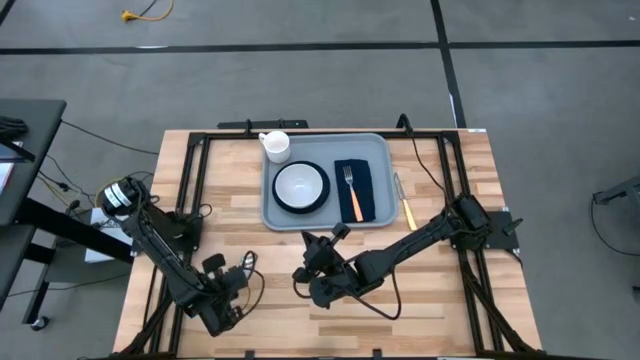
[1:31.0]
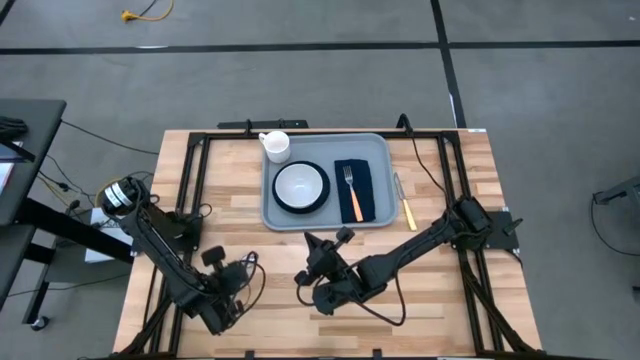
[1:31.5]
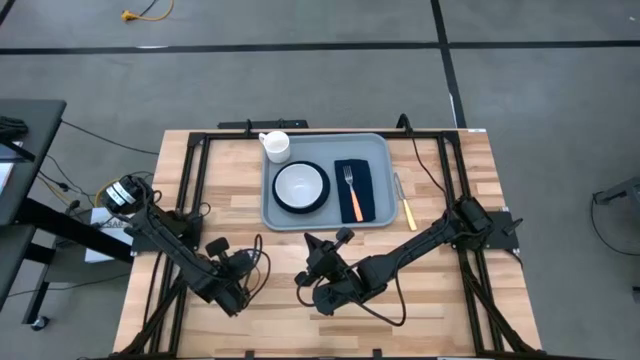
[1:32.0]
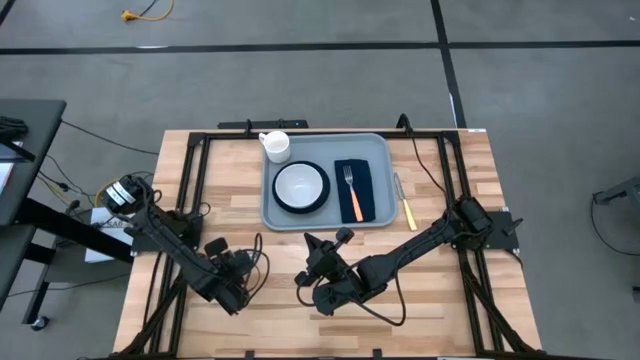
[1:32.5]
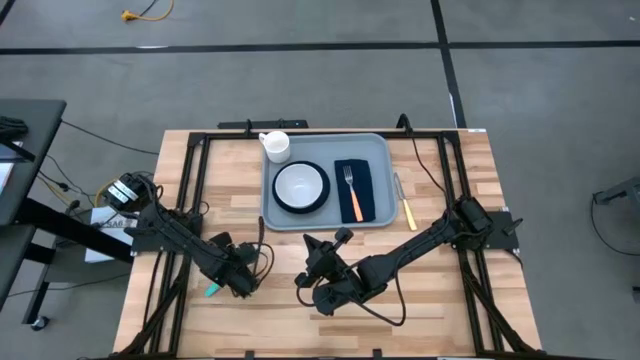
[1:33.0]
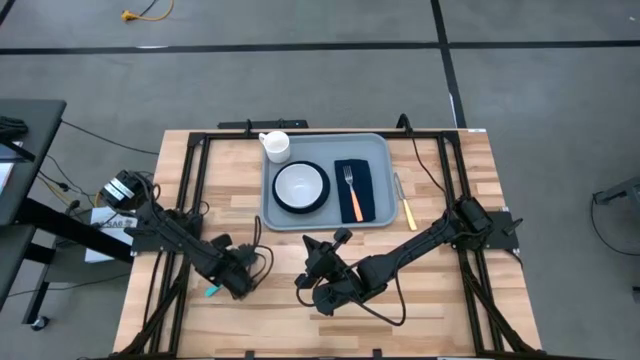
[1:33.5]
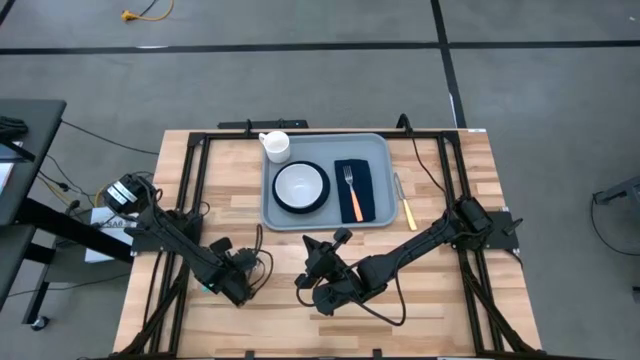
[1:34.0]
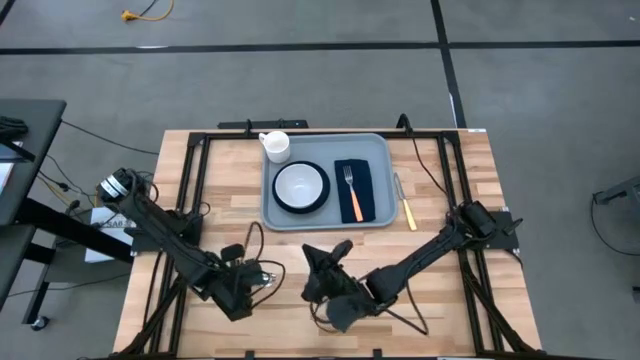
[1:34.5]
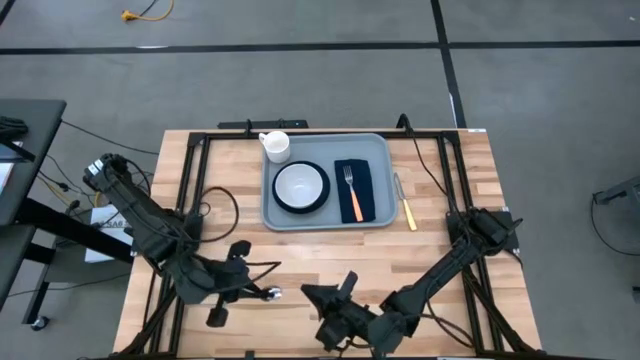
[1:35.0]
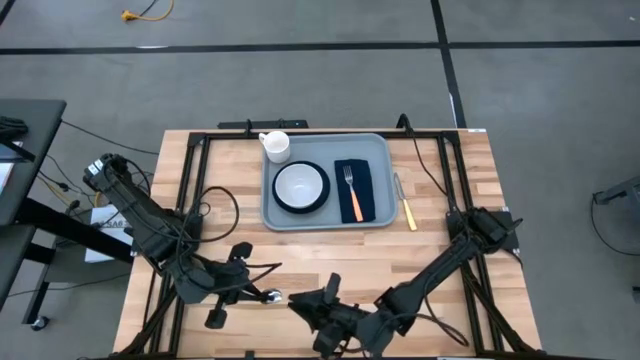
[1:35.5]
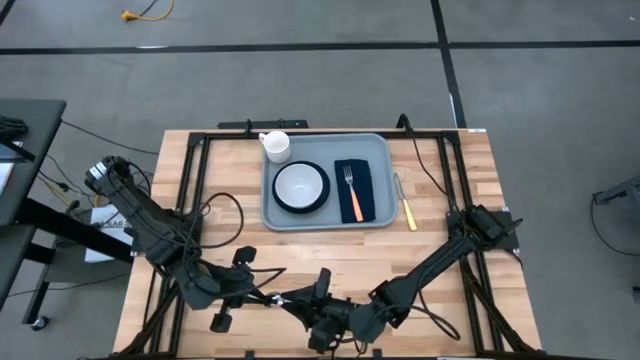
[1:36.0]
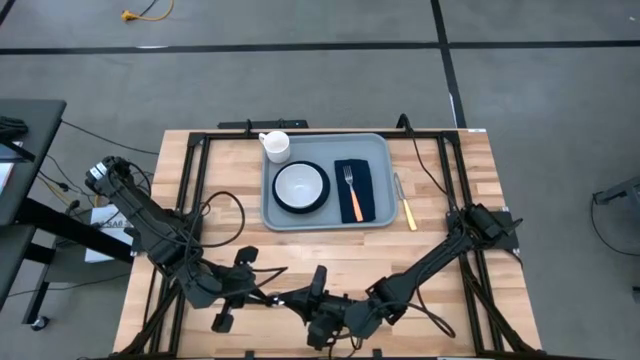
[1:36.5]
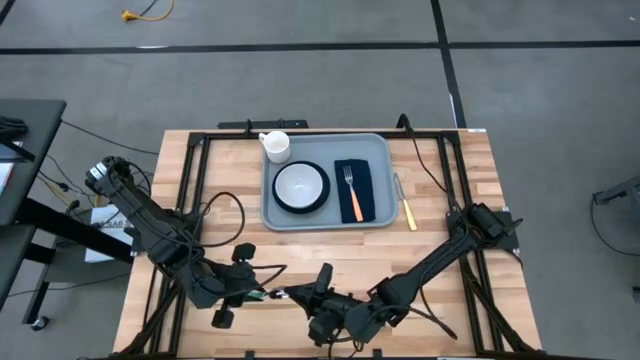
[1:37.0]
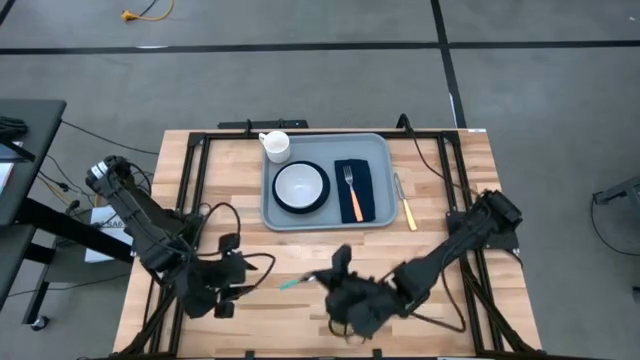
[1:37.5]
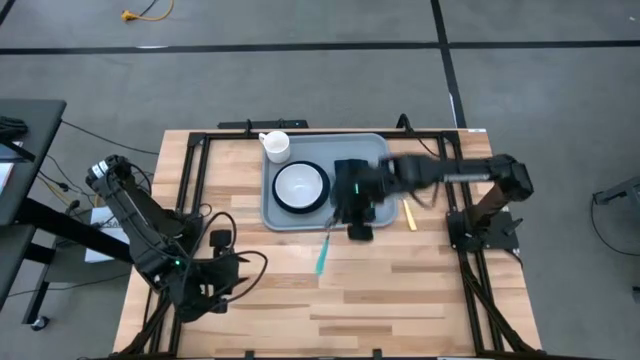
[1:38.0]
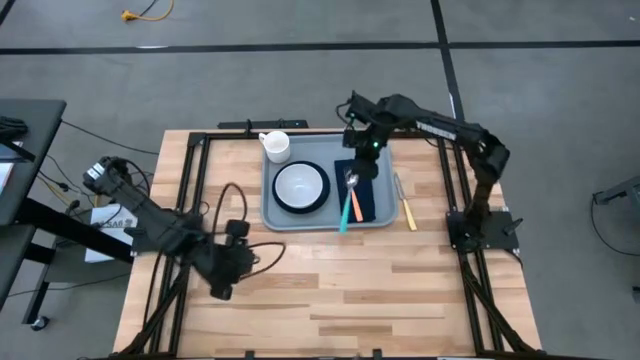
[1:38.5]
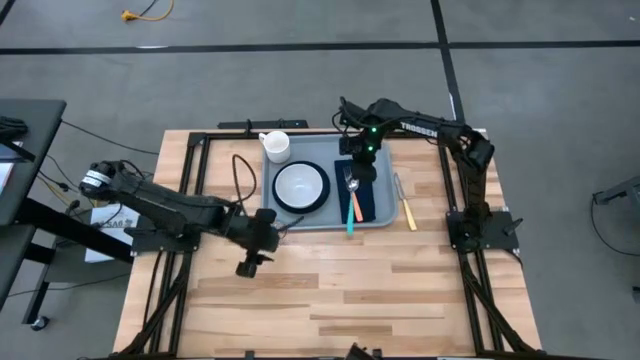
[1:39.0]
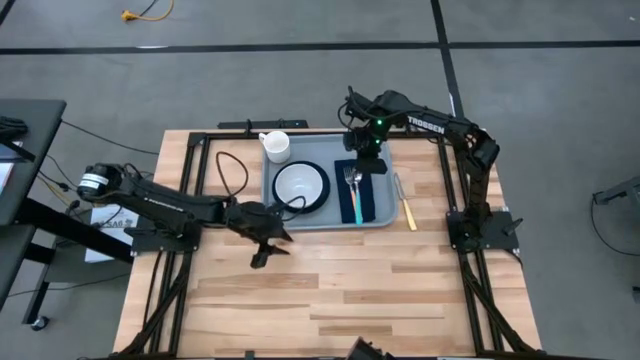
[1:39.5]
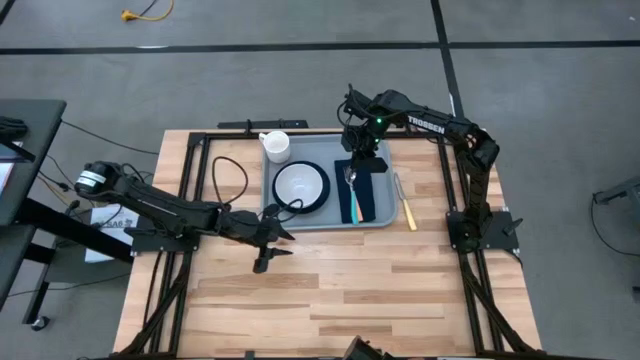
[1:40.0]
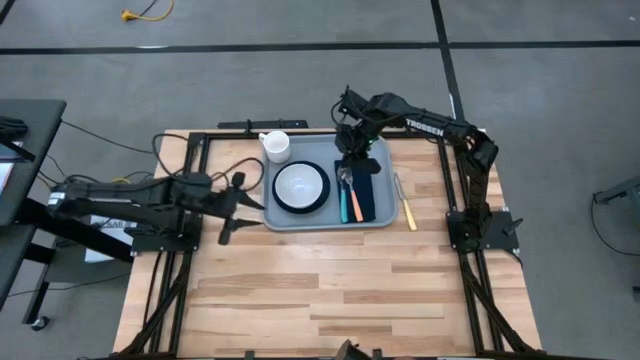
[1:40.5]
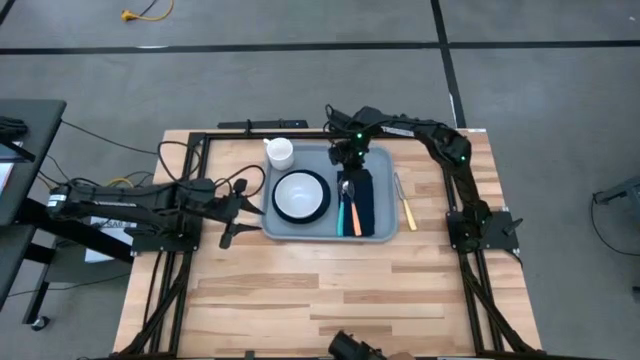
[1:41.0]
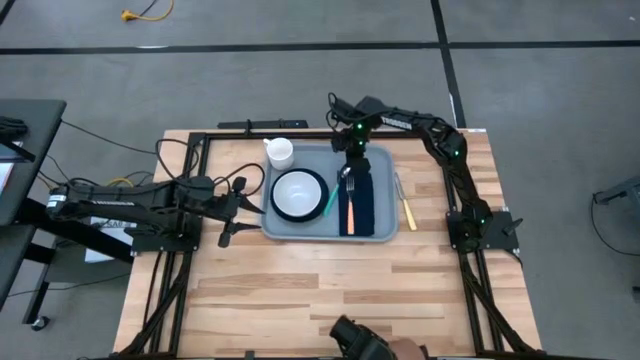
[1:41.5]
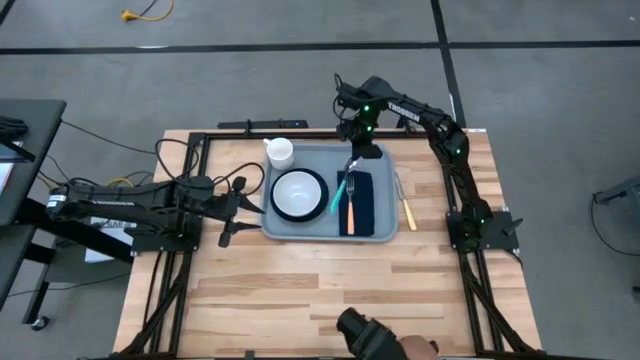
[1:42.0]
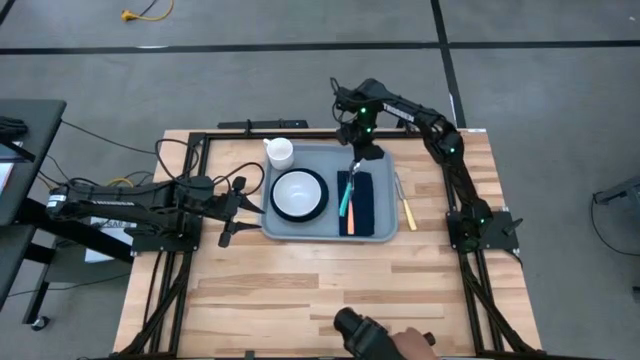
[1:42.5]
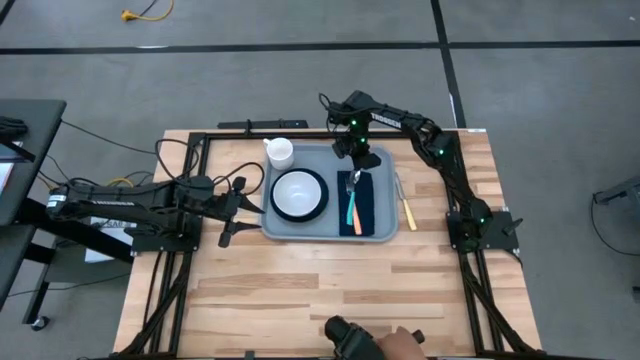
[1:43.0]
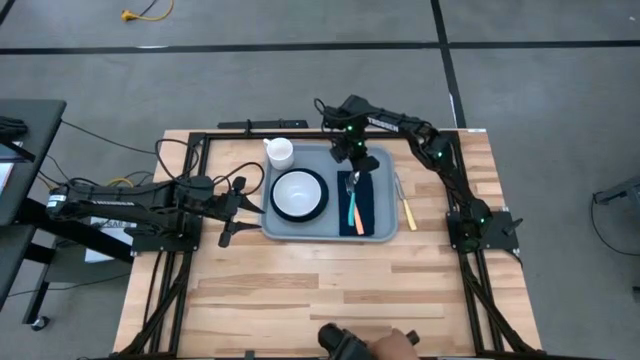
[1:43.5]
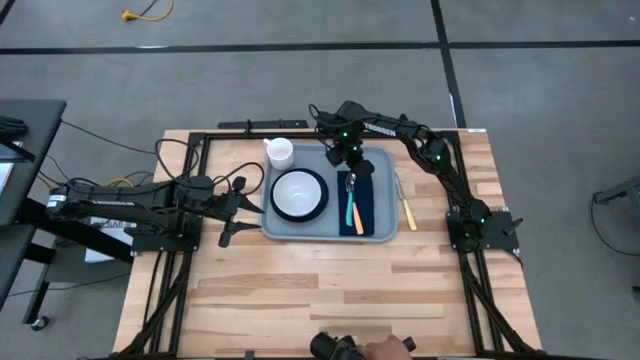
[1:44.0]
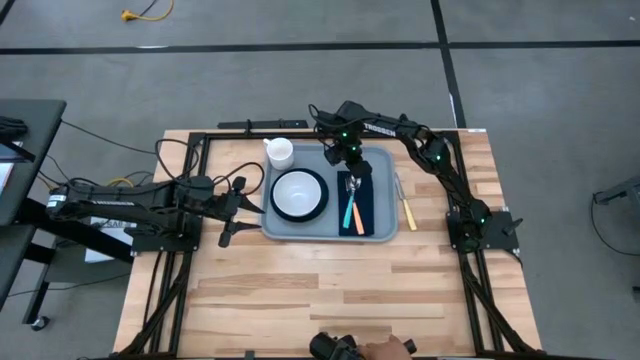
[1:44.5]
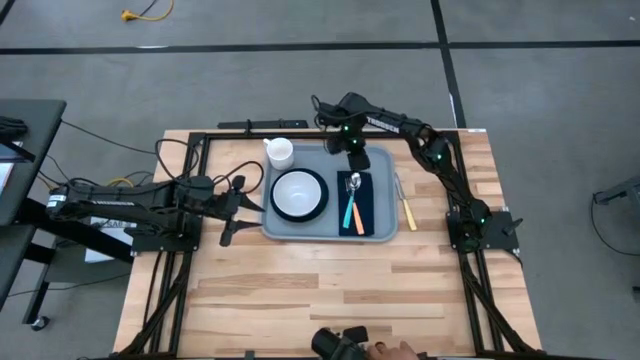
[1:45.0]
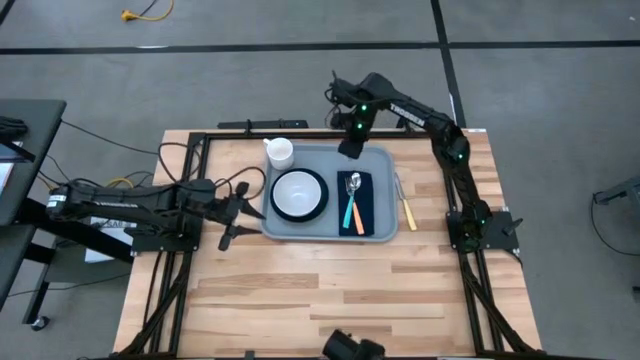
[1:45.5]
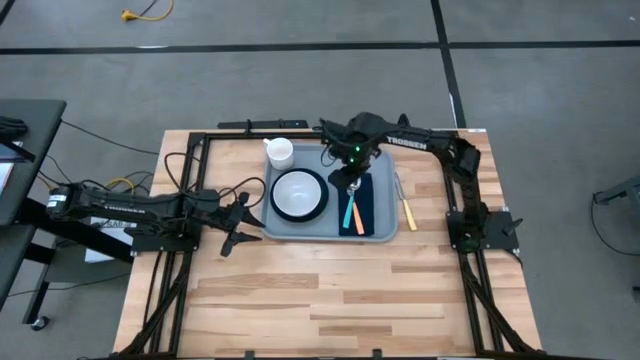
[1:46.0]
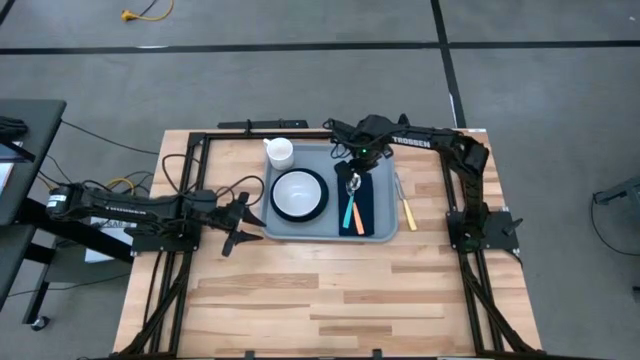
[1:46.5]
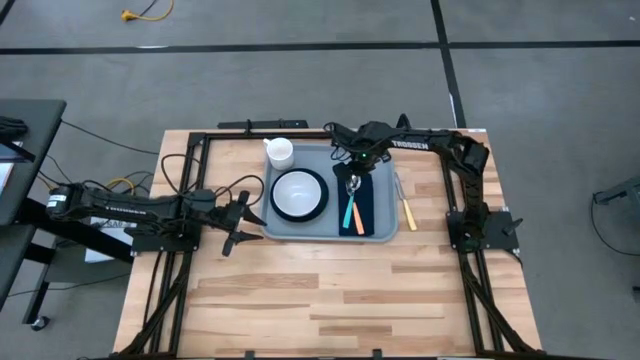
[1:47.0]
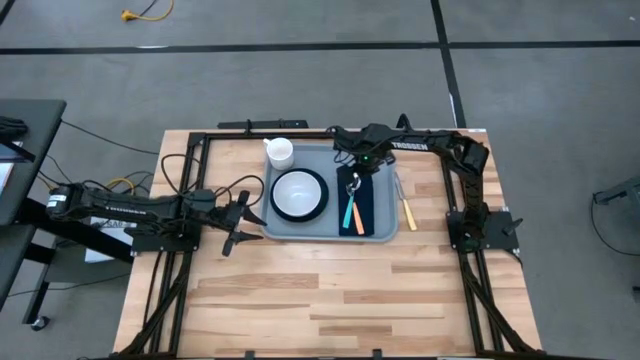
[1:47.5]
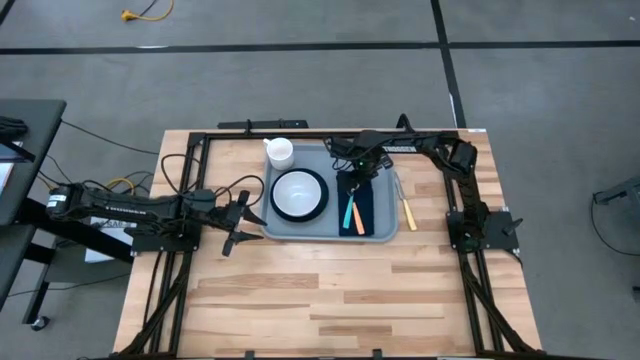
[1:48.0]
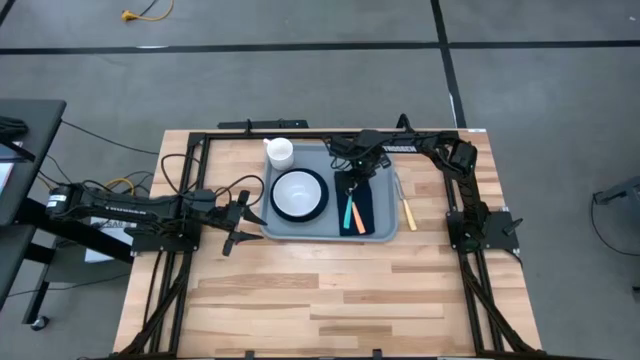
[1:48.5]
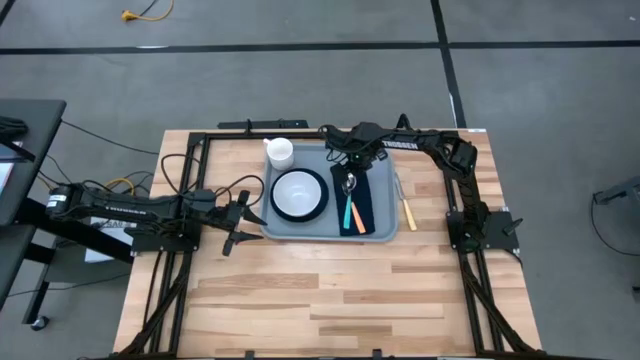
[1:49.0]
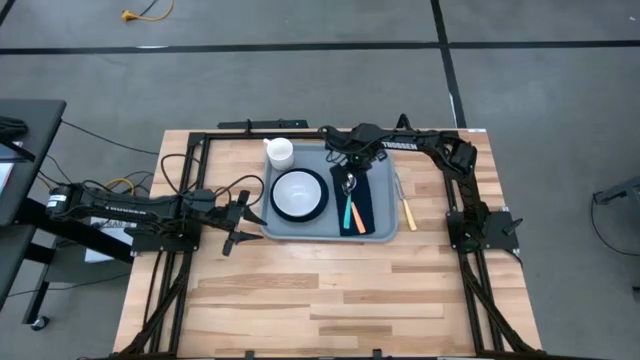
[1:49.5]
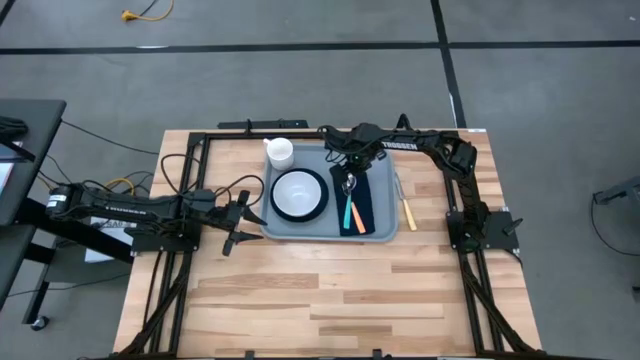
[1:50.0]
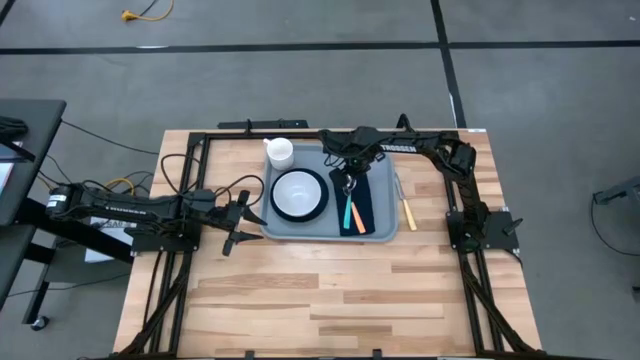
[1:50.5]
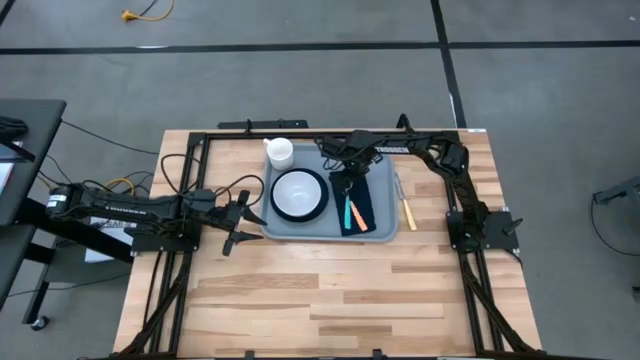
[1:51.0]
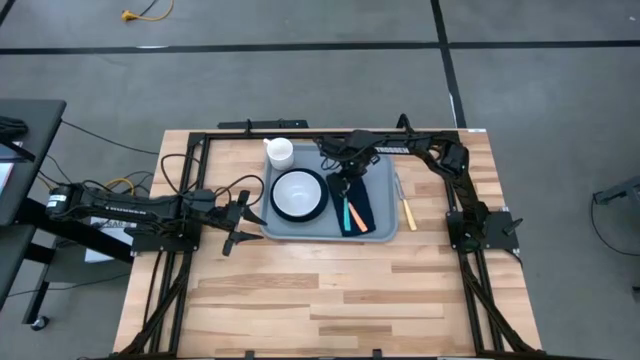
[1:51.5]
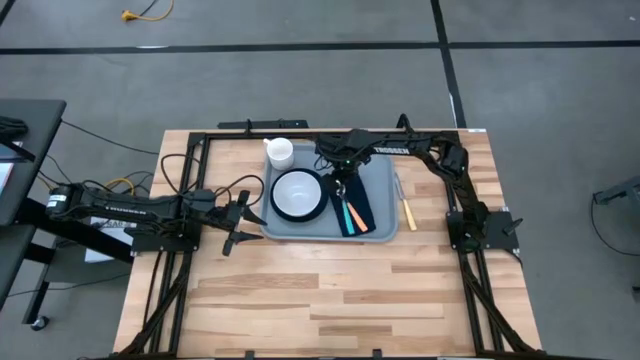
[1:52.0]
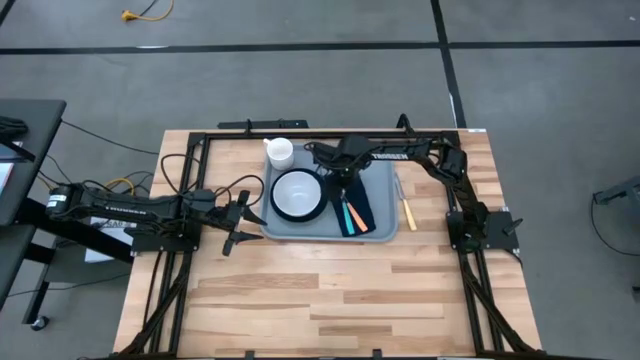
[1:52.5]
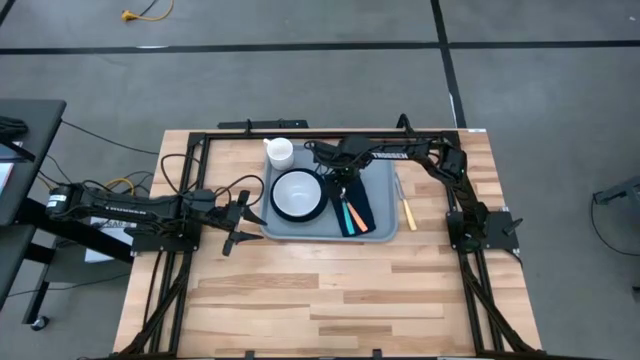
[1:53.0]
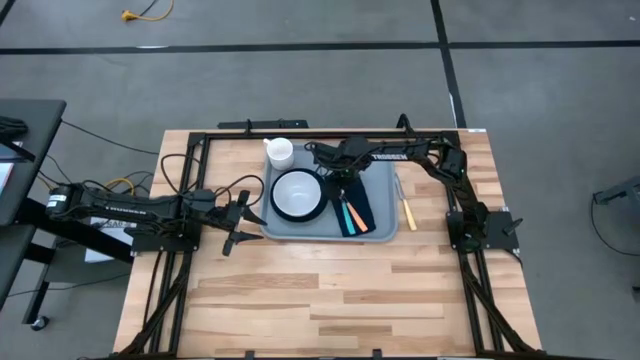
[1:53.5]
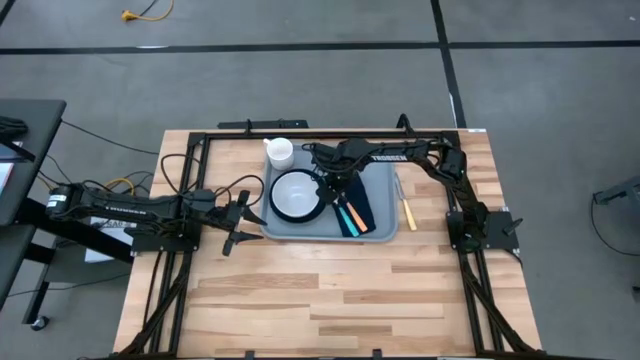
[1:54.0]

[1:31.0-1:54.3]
Task: Set up tray
Put the blue spoon to the right of the green plate on the blue napkin on the gray tray
